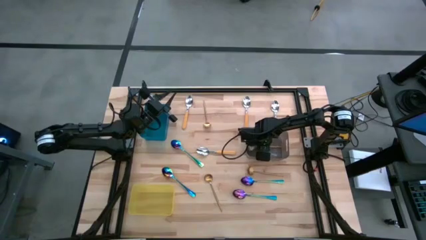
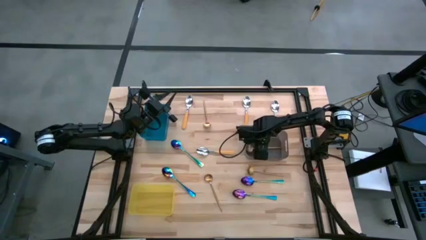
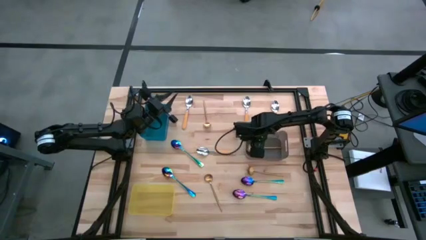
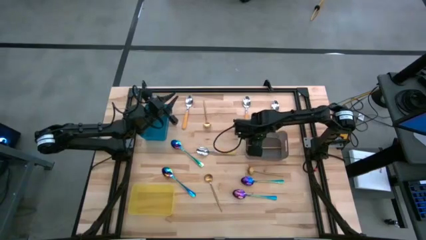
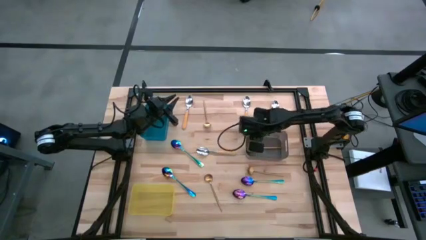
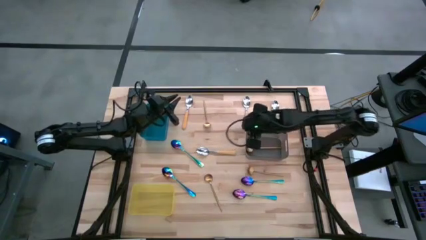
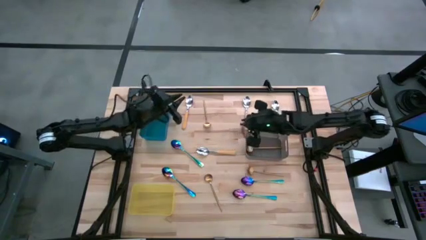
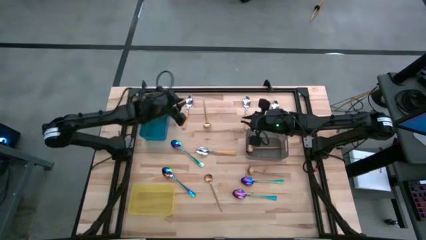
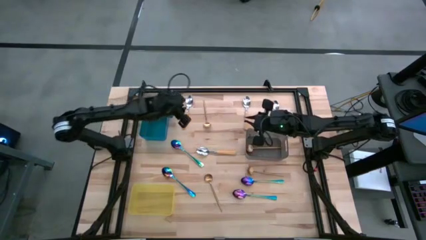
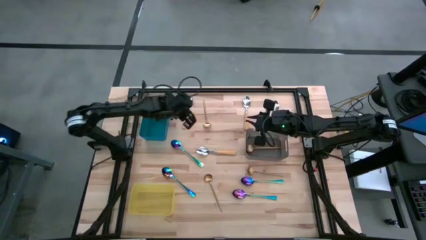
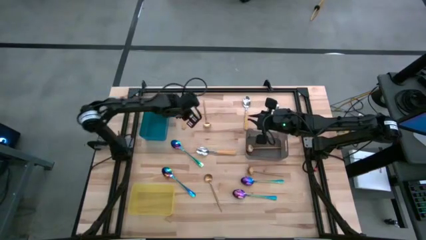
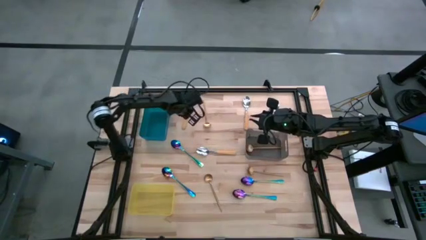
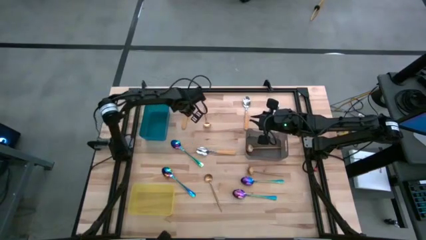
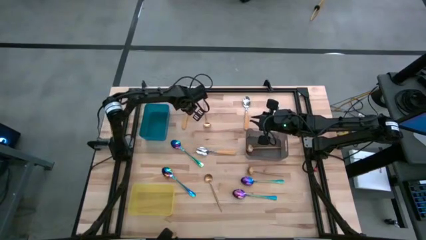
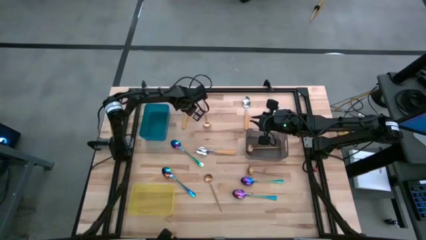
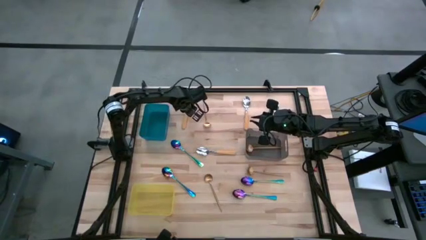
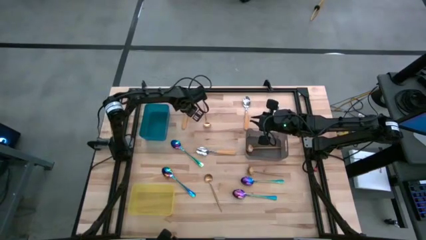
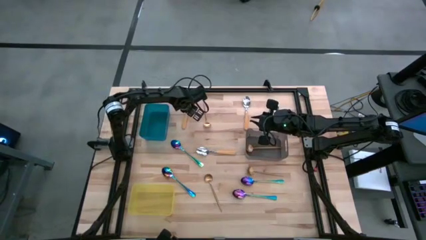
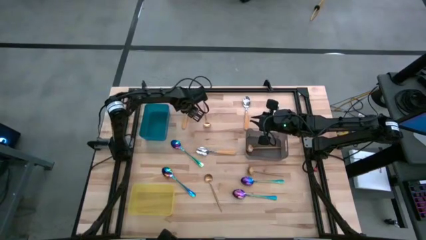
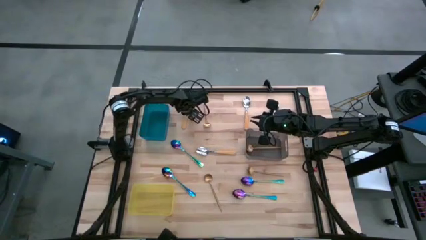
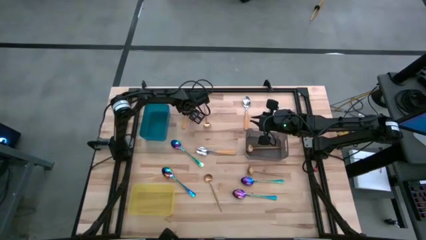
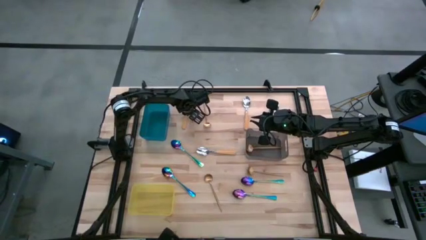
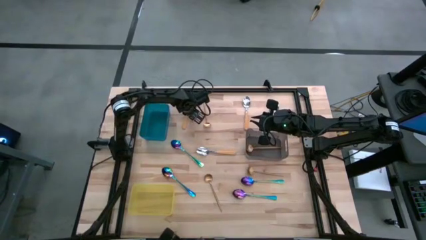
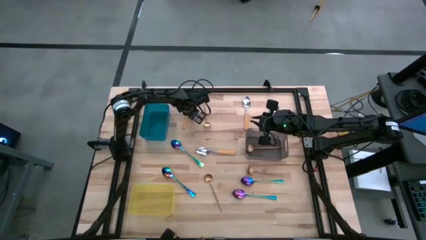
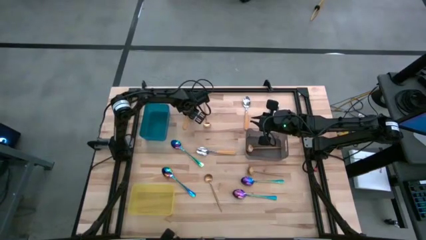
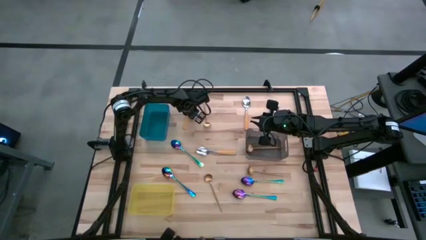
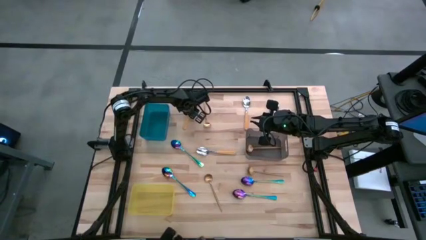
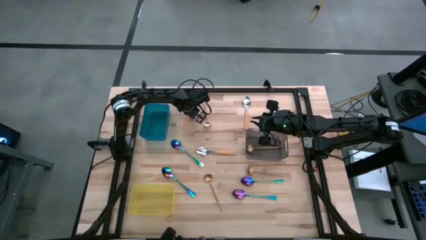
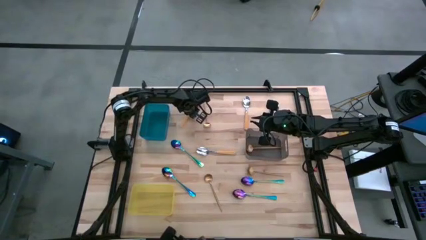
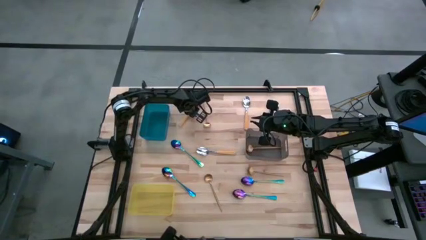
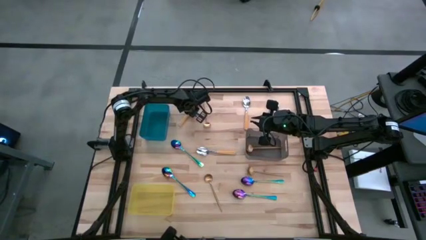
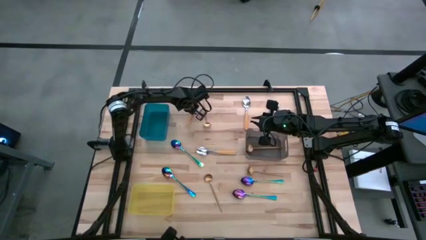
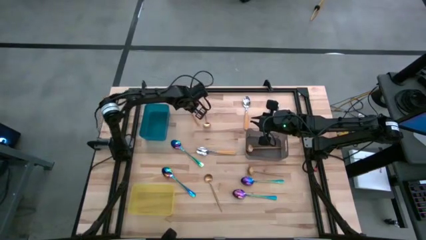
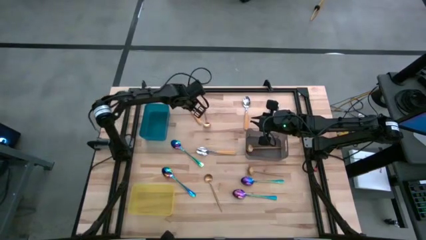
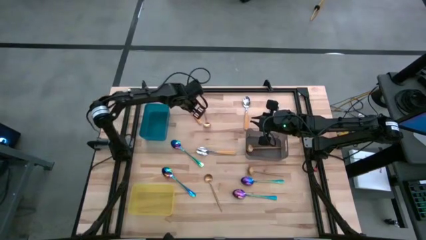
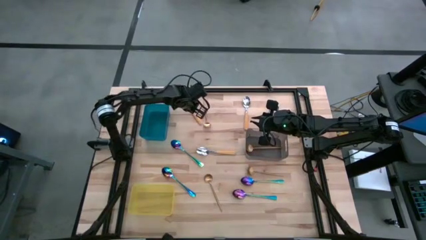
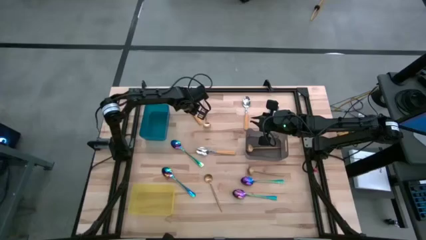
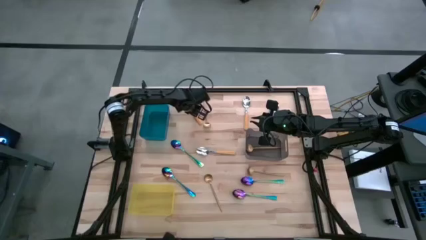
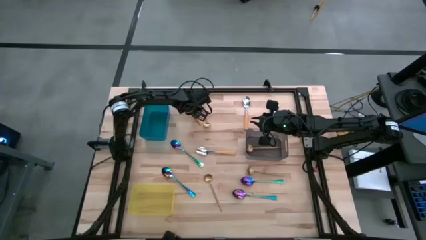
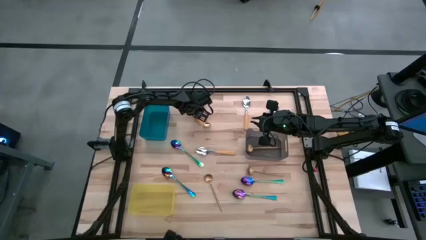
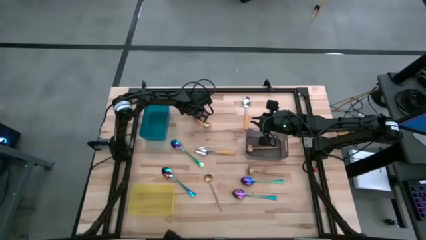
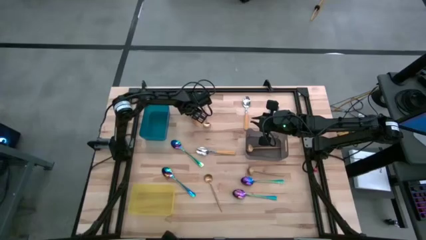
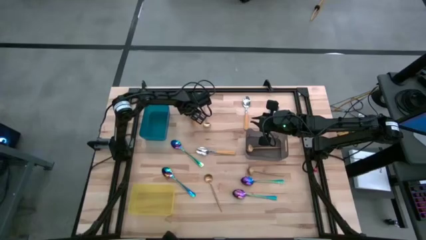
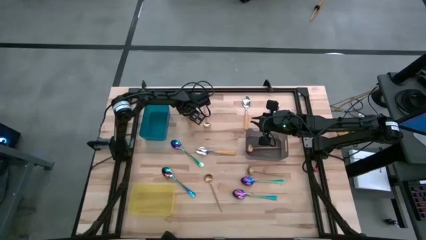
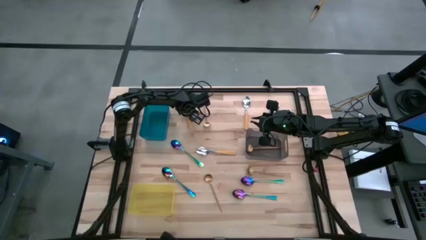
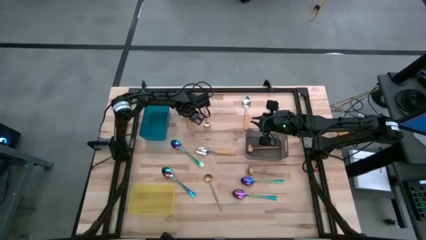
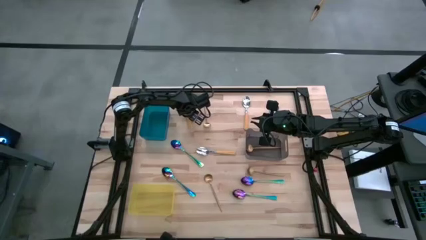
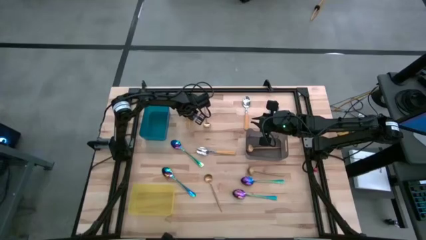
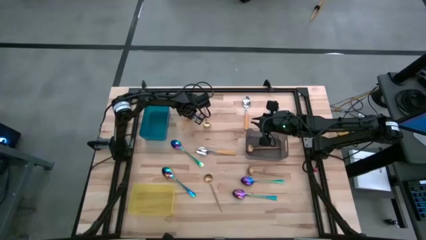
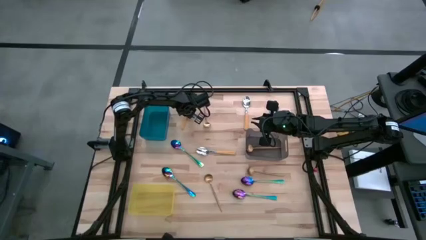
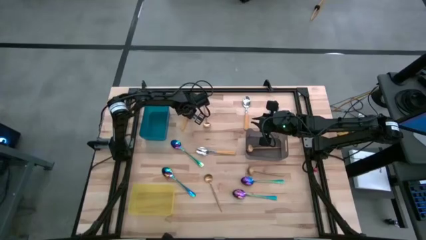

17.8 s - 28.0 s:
Task: Sort silverware by color (type)
Put the yellow spoon into the yellow bin

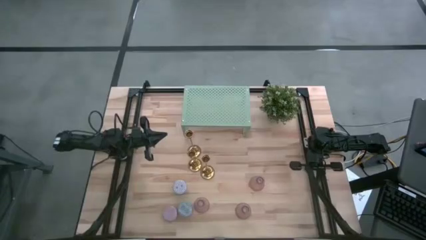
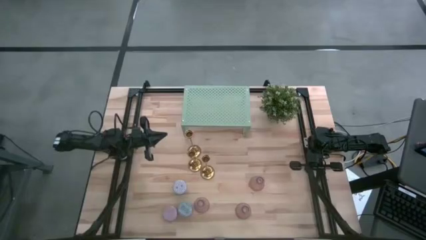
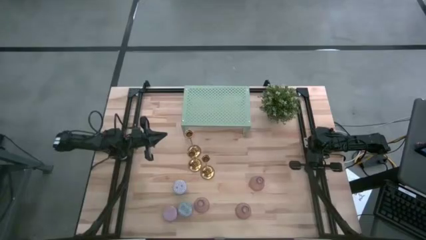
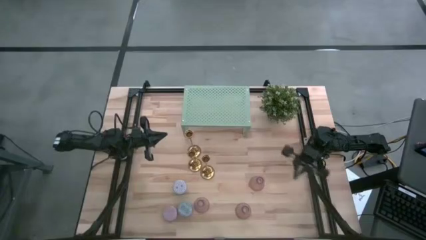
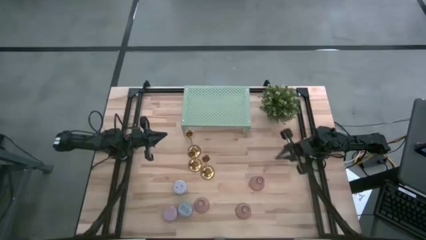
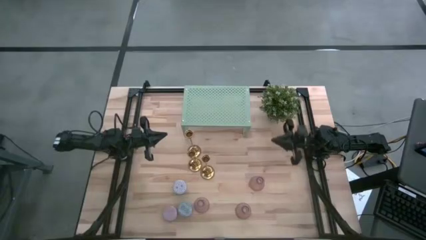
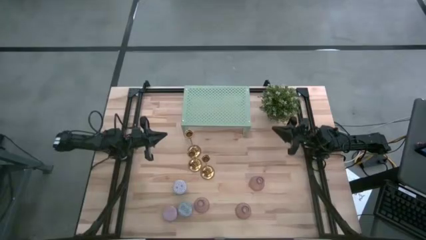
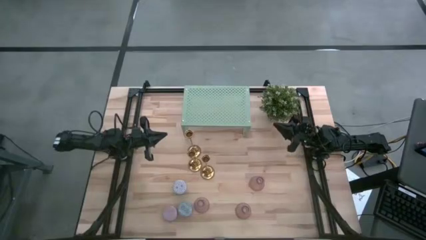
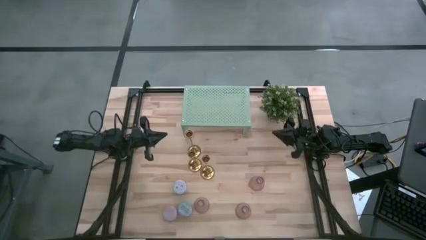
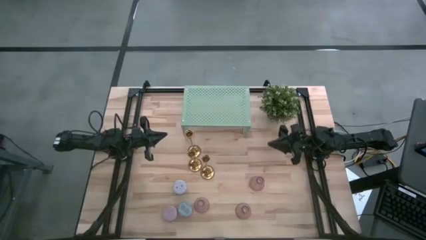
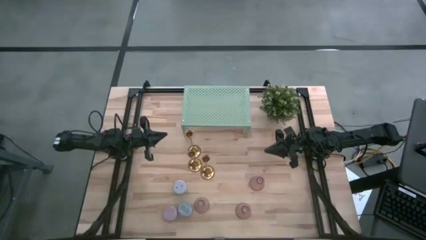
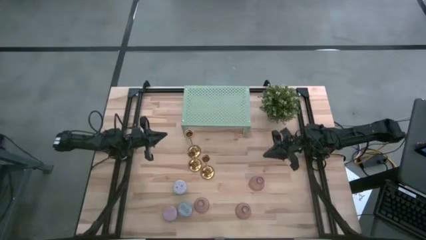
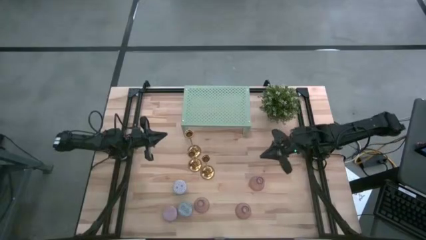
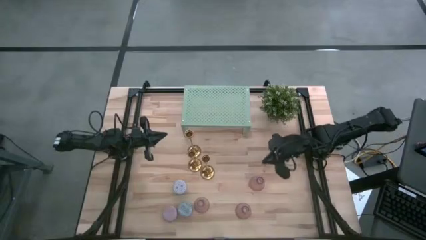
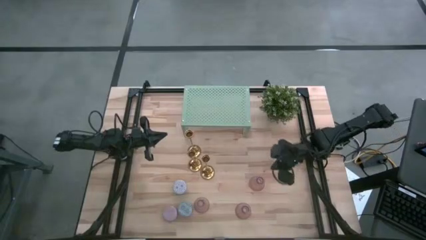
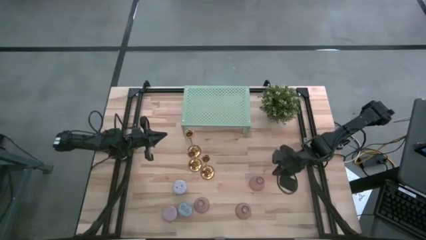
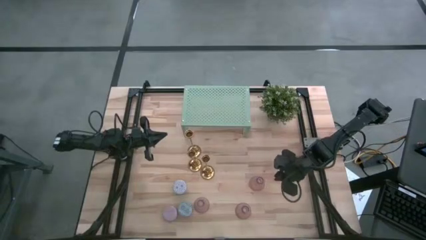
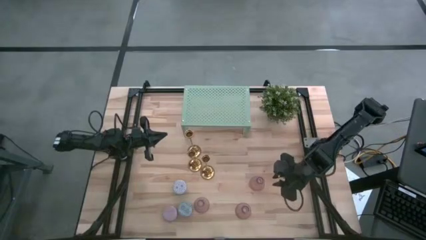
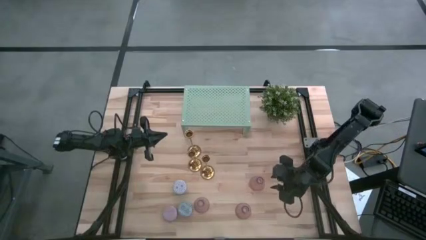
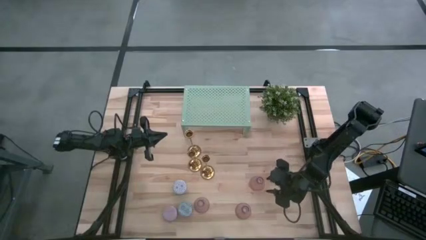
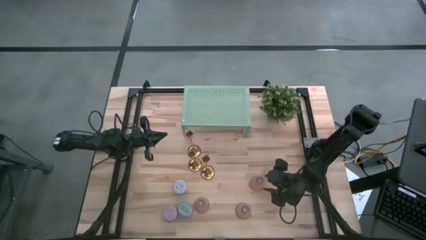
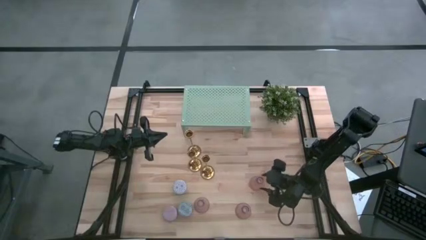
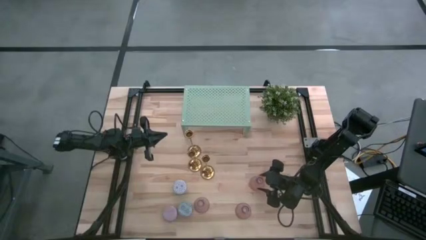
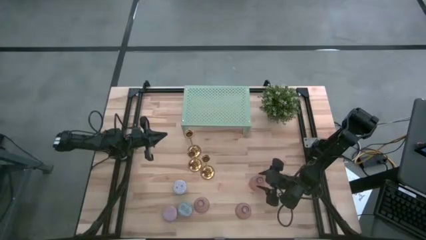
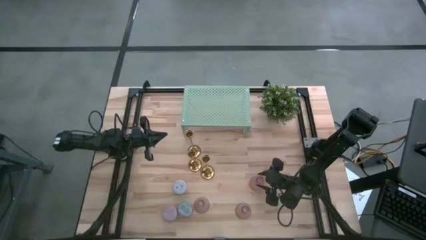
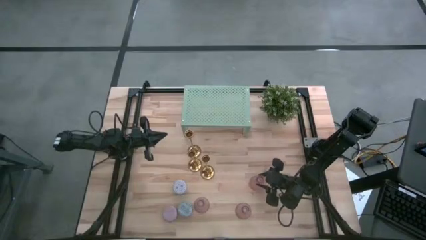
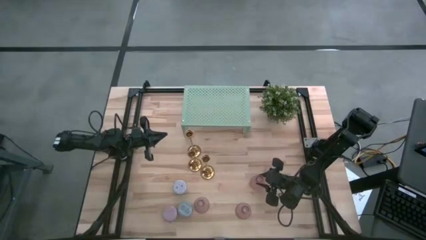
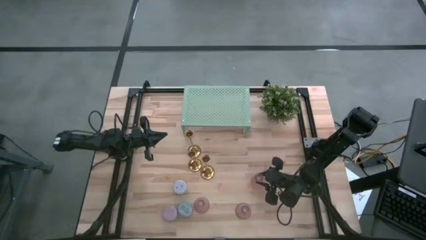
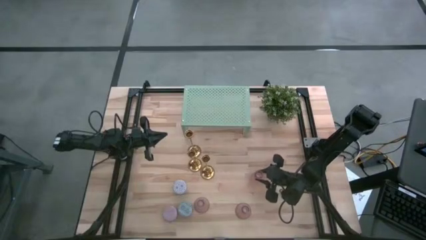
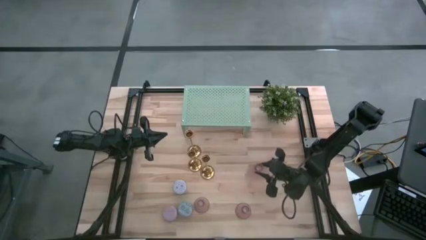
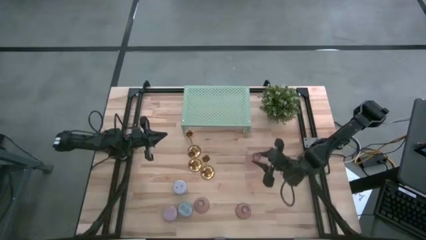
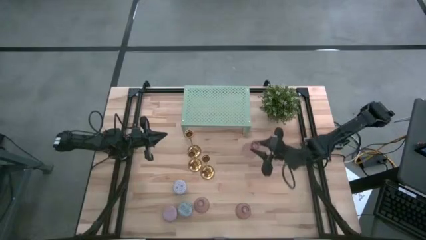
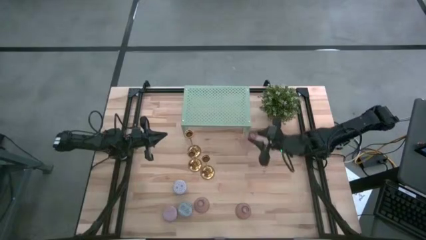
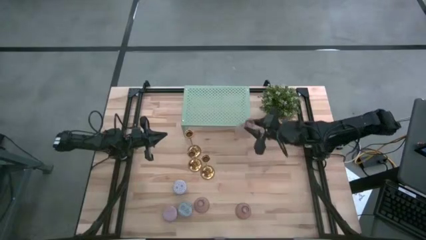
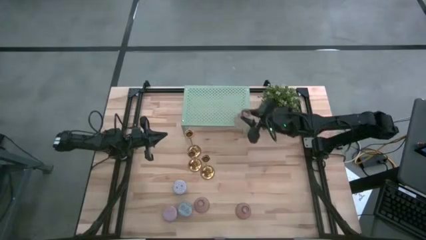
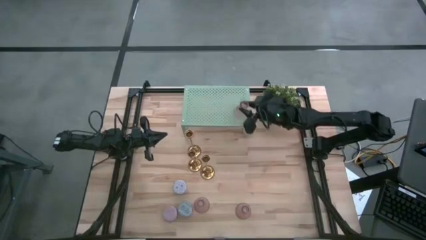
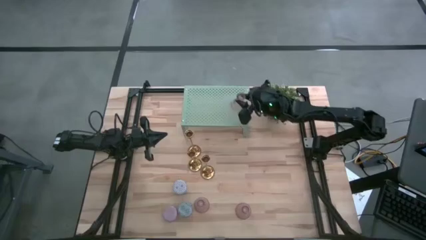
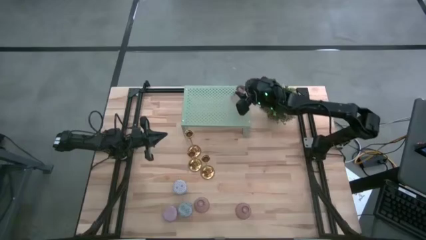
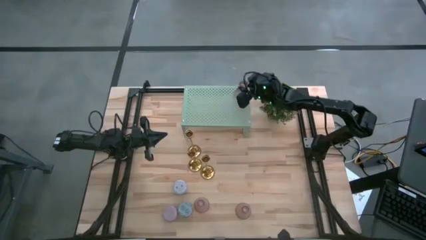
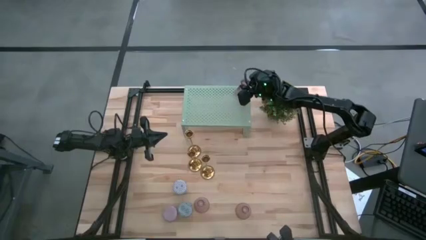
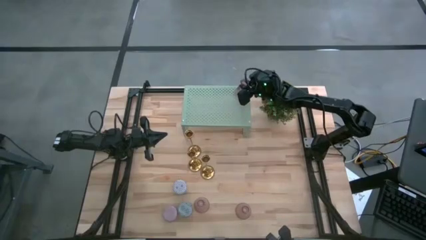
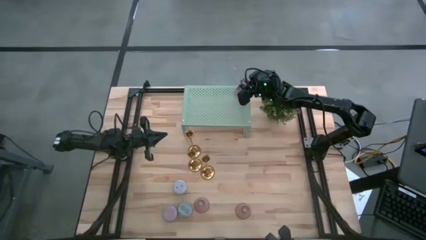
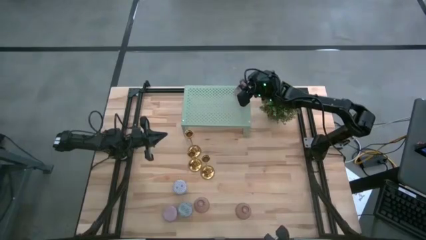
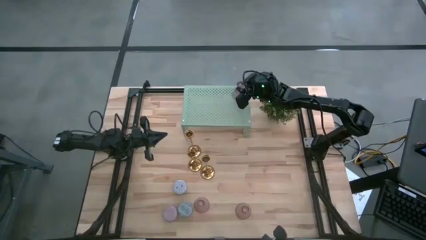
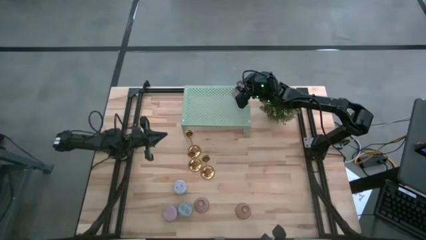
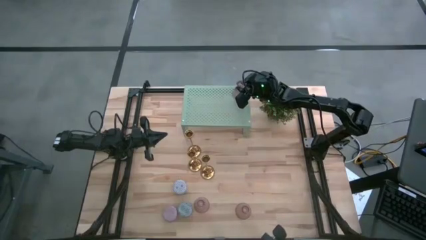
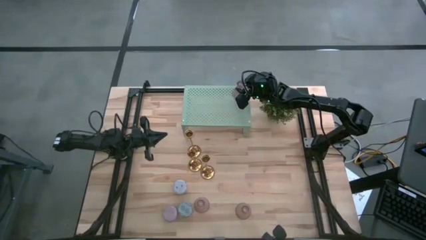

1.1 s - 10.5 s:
Task: Pick & Place candle stick holders
Put the top right light purple glass candle holder on the shelf
